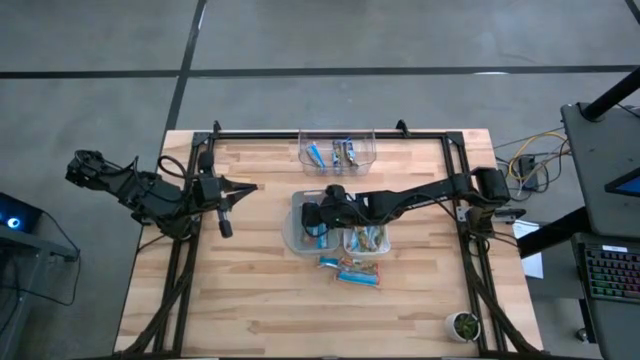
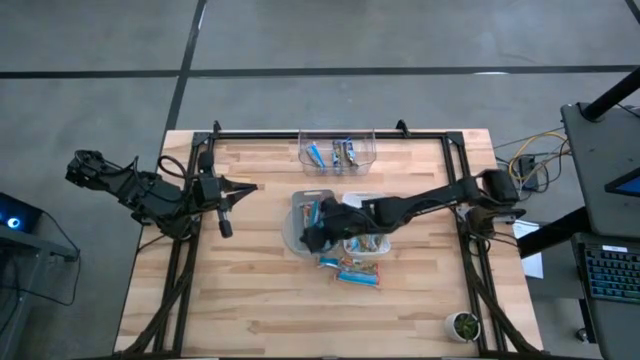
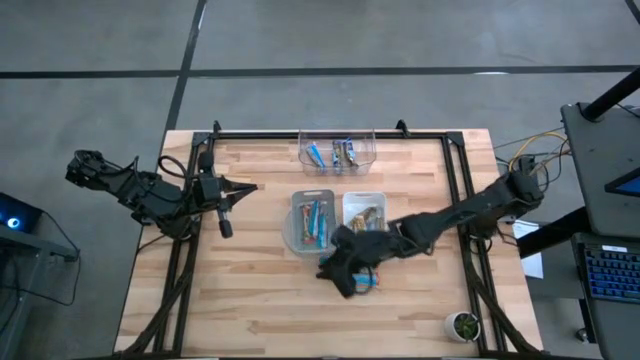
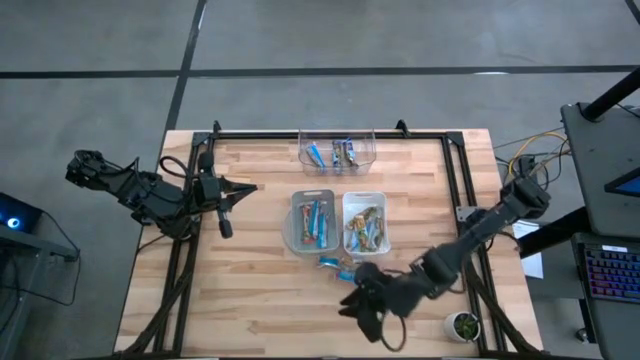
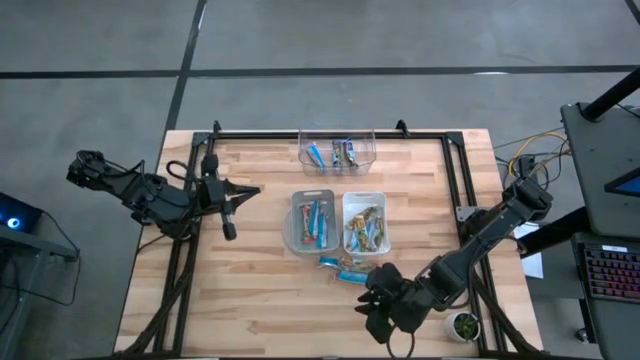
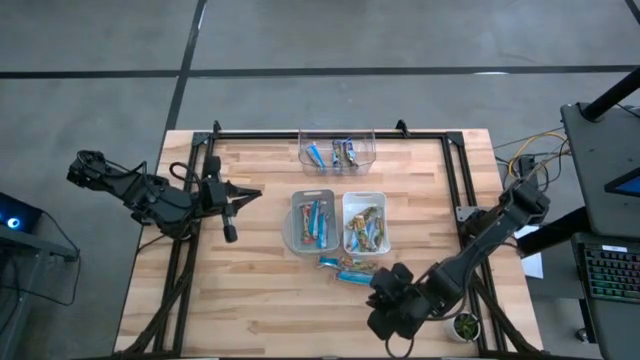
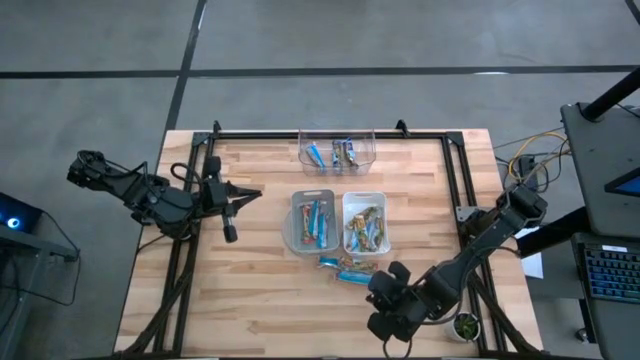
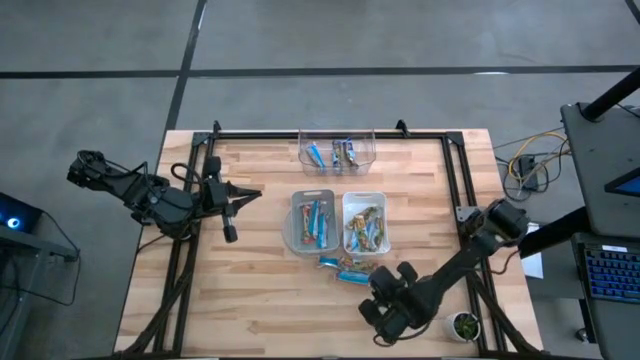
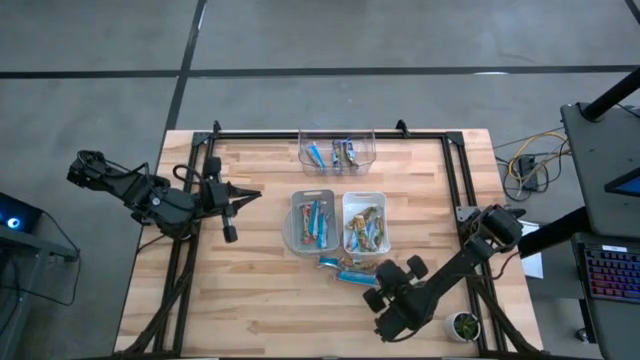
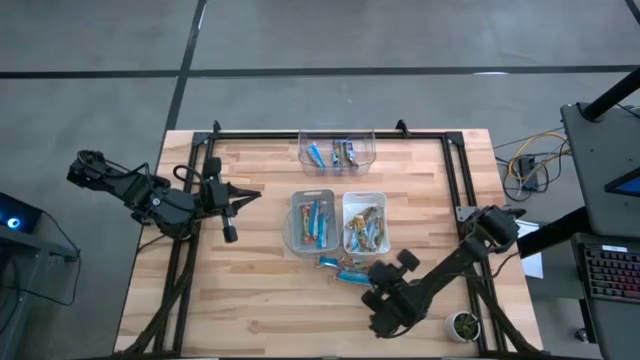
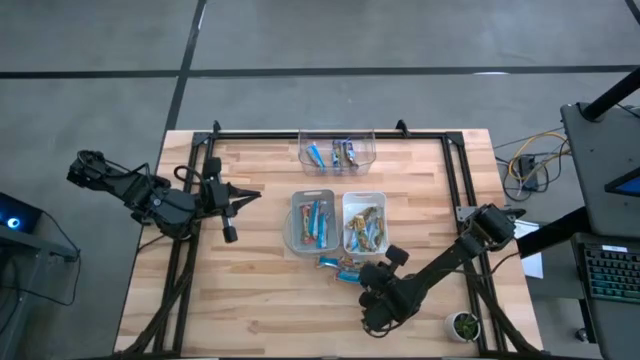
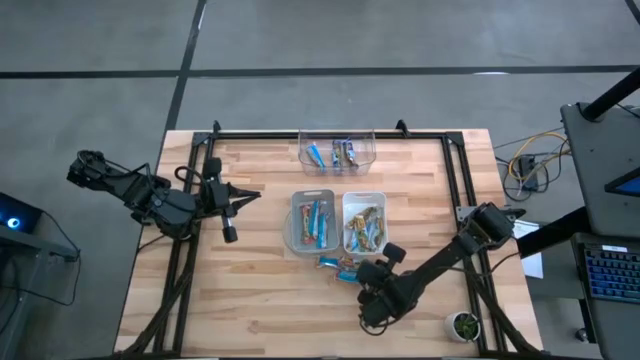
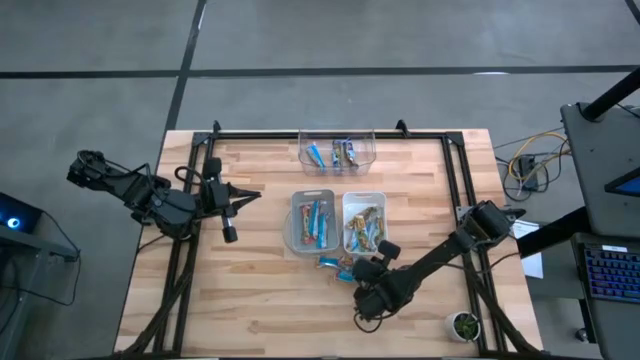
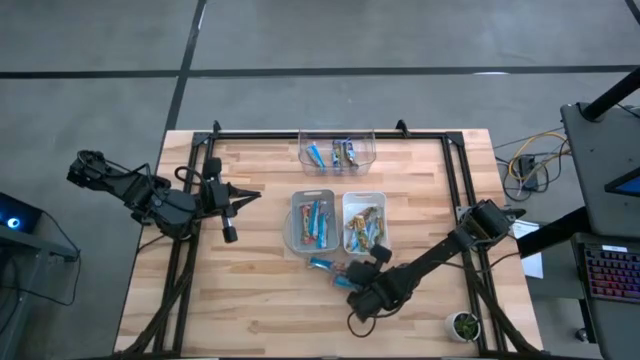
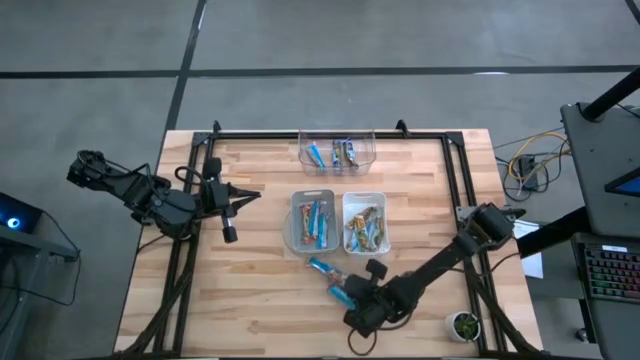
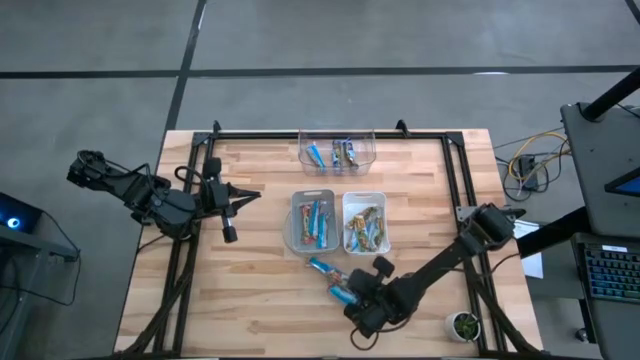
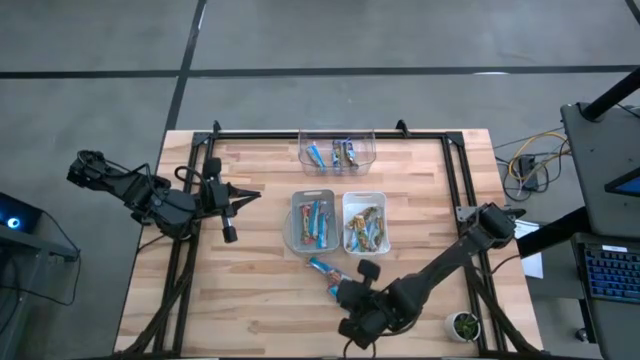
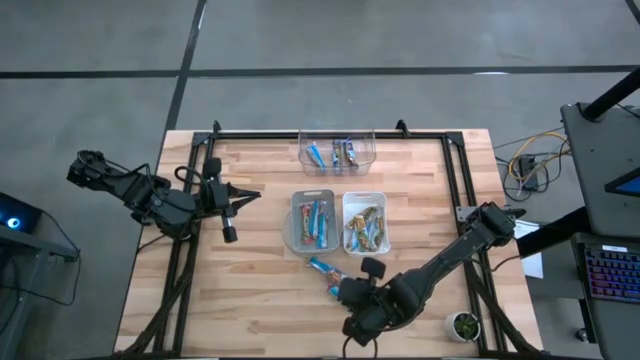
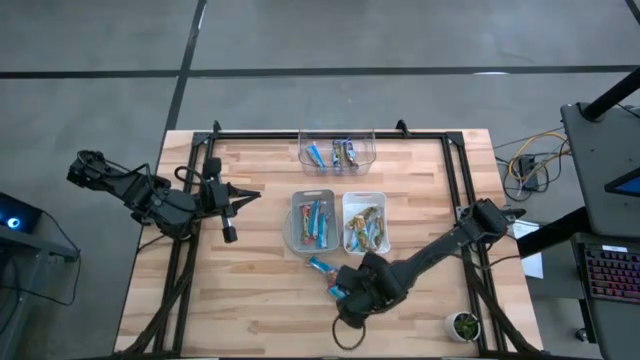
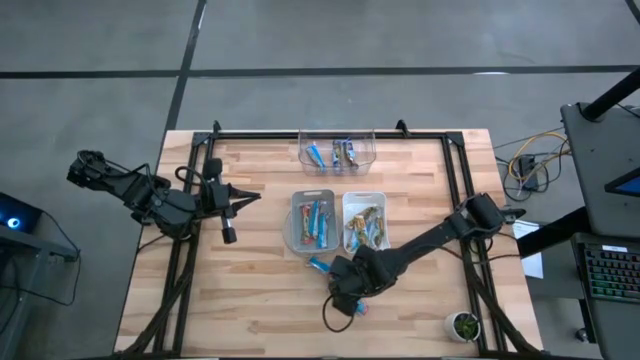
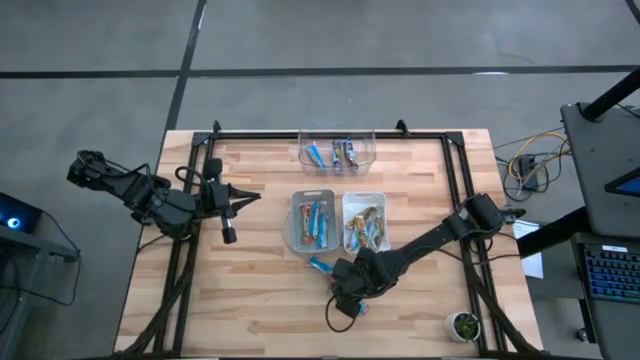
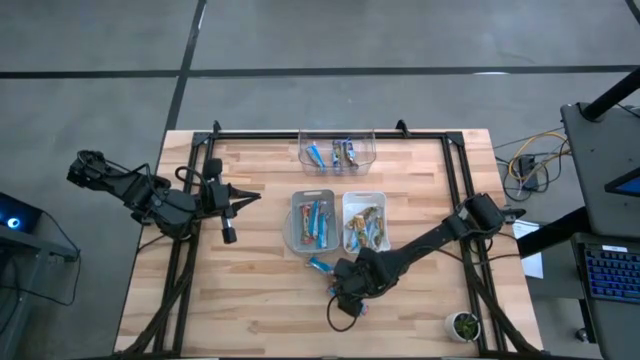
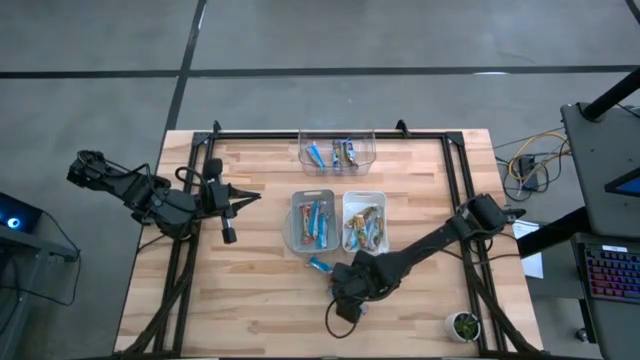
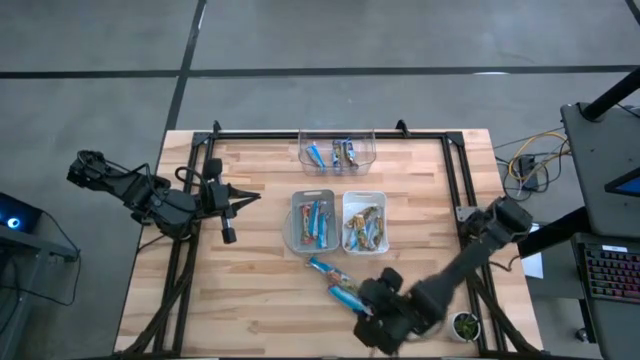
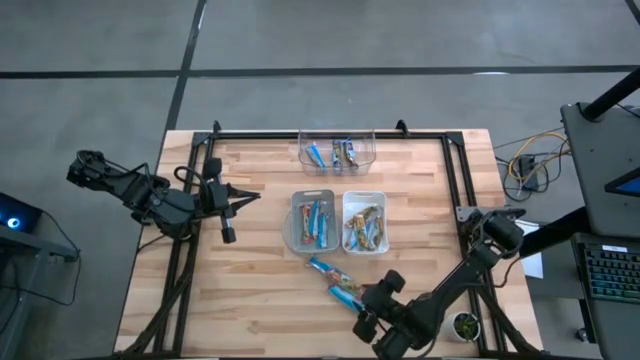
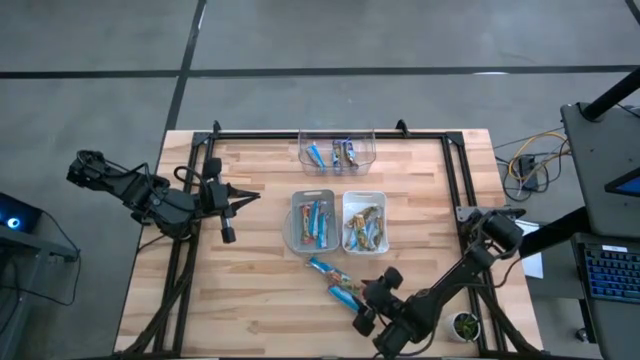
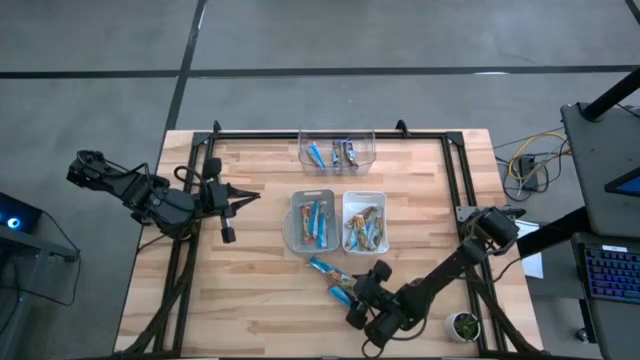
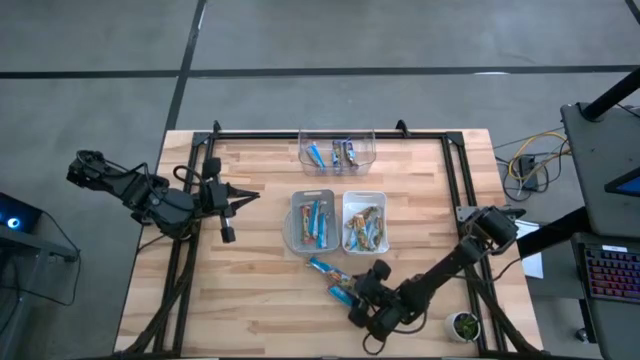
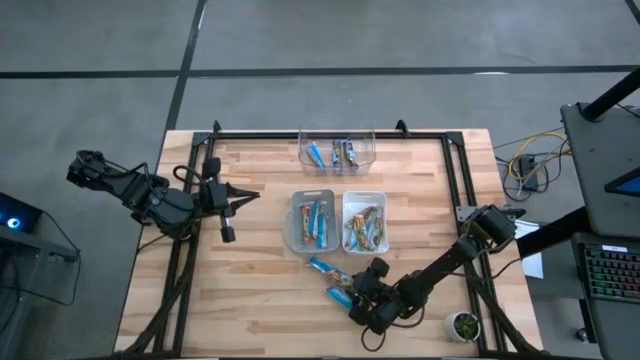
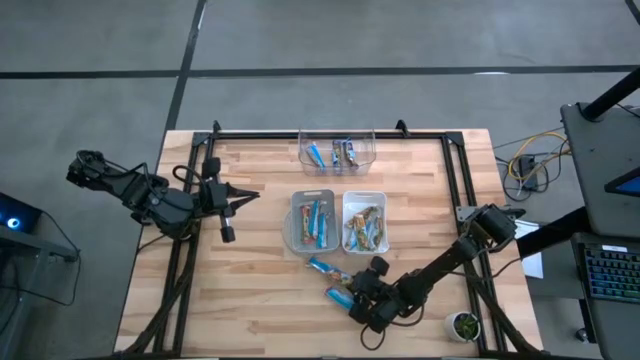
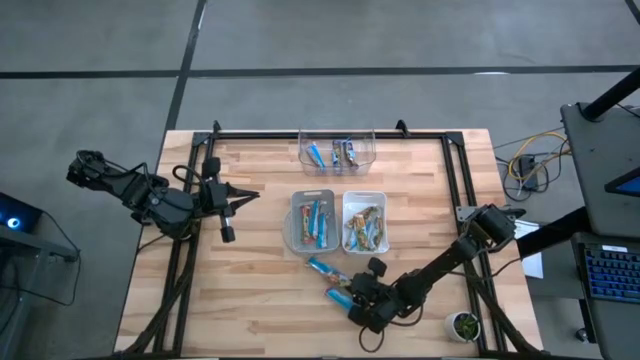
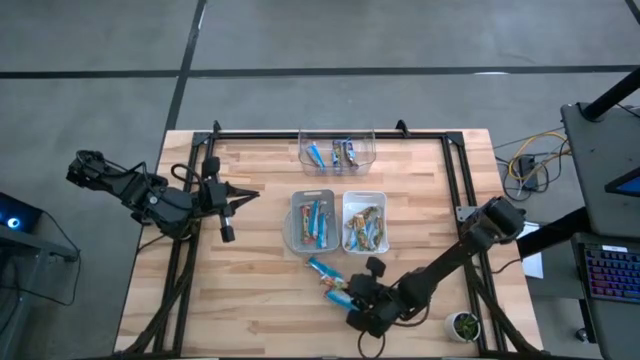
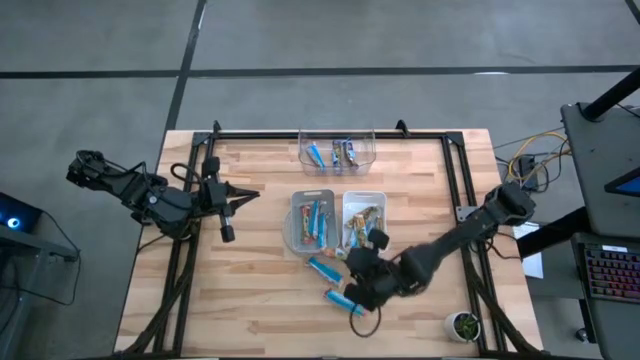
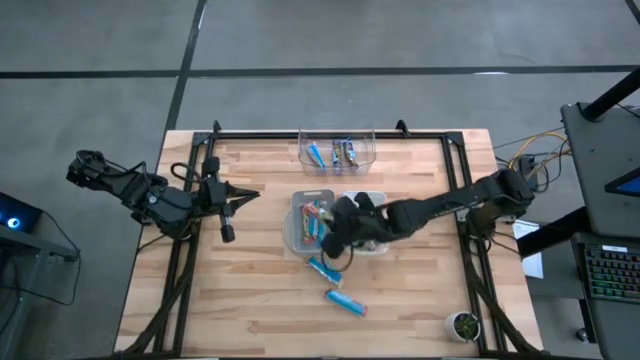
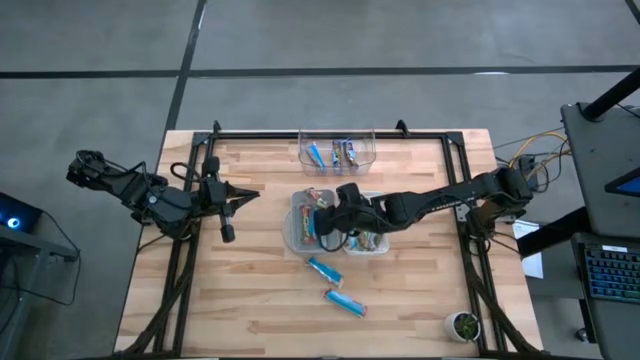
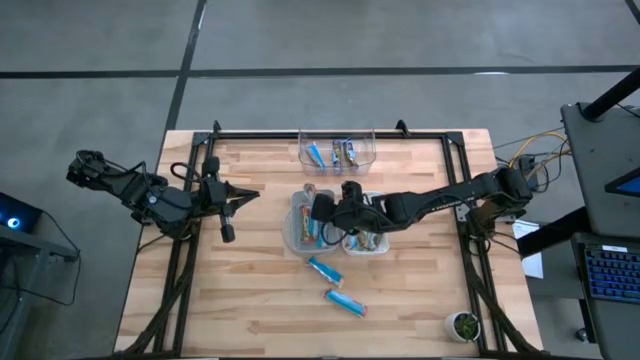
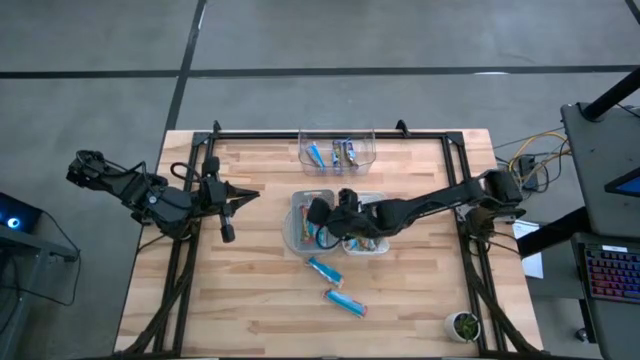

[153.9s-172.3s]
Task: Pick and place Granola Bars by type
Put the red granola bar into the gray bin

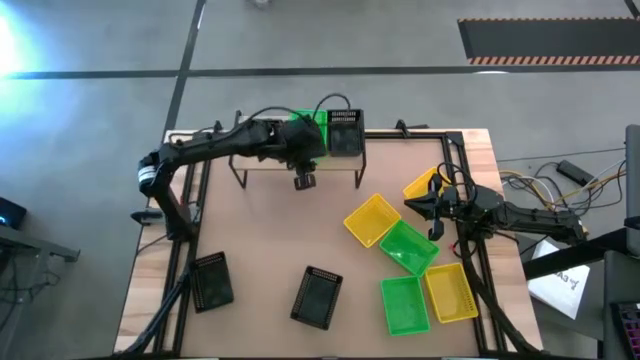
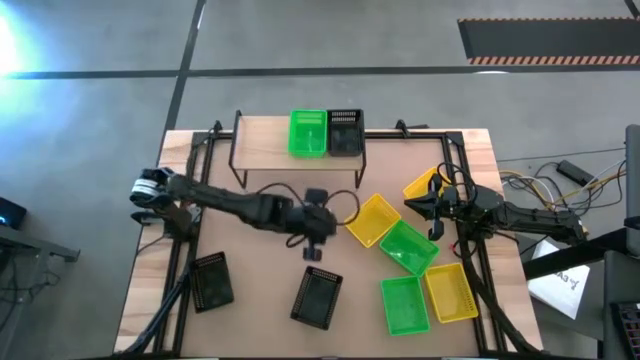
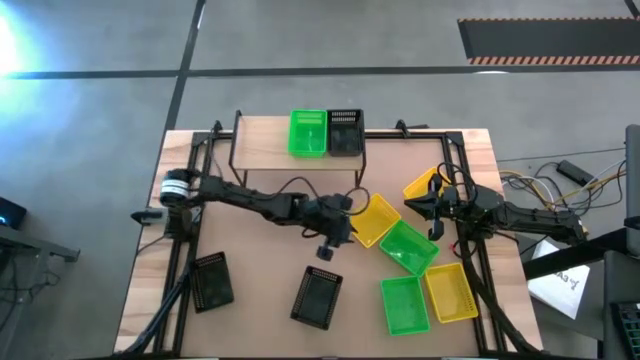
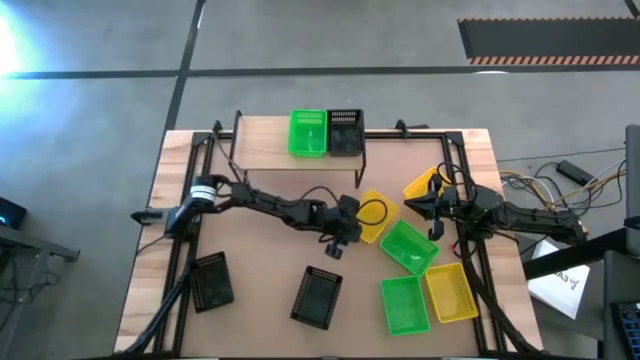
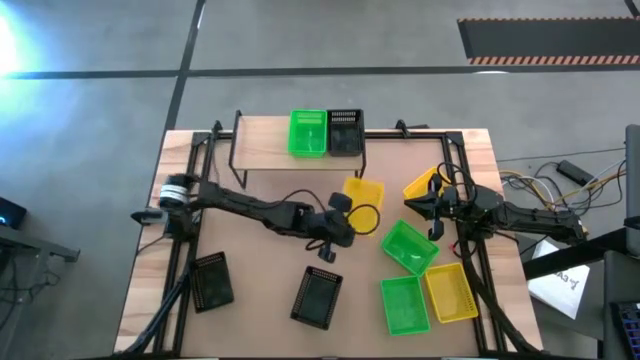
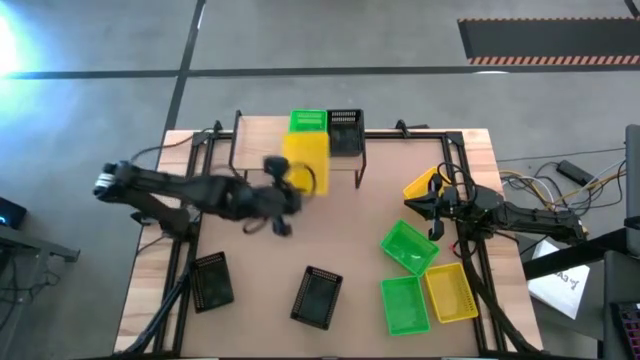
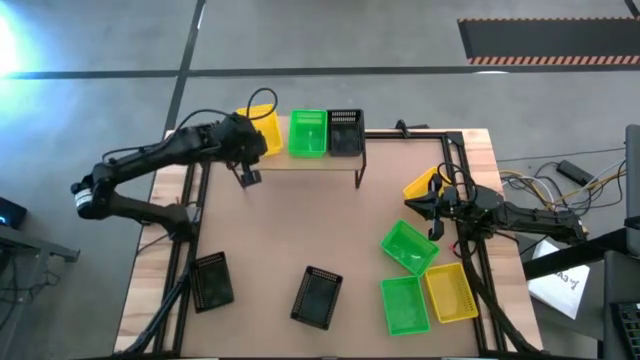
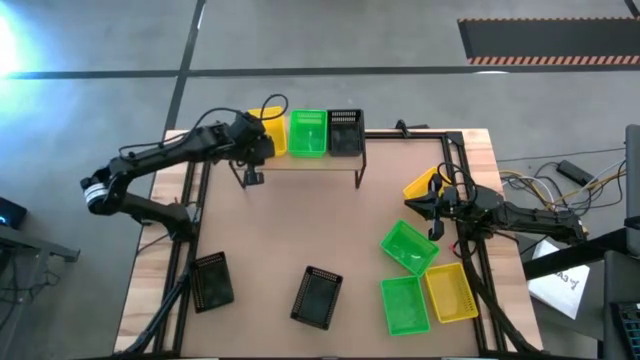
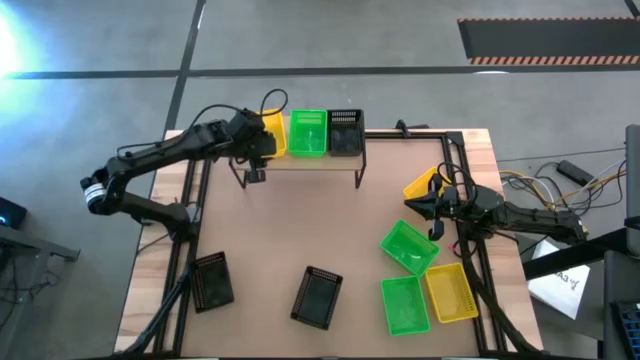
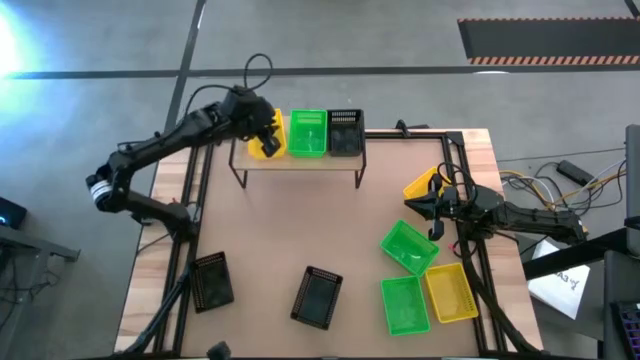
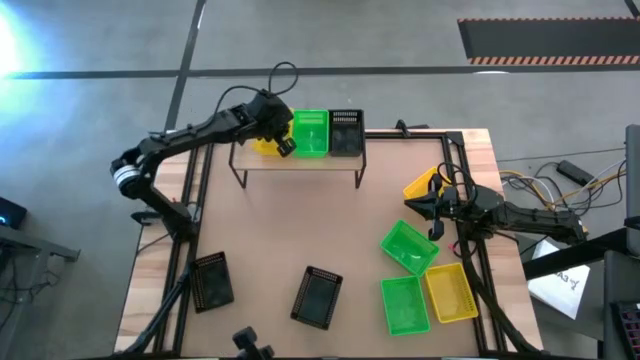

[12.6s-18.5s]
Task: Stack baskets on shelf by color
Put the left yellow basket on the shelf
